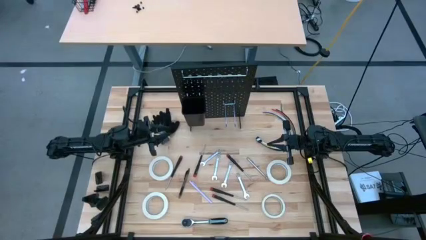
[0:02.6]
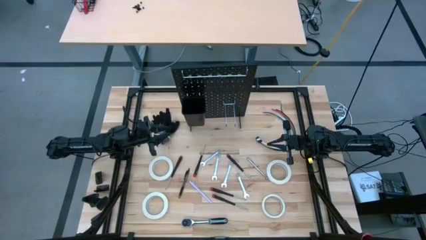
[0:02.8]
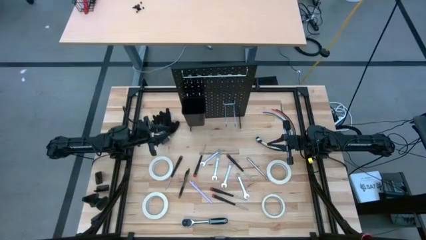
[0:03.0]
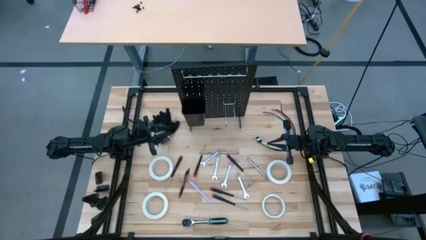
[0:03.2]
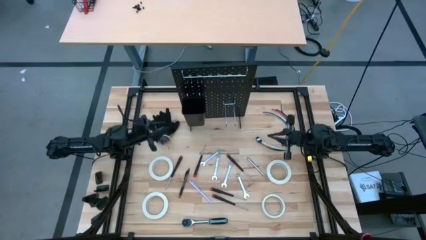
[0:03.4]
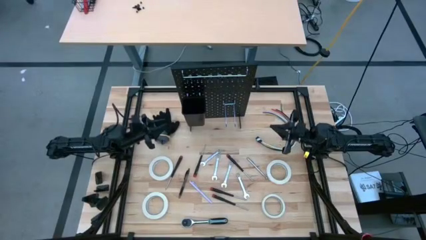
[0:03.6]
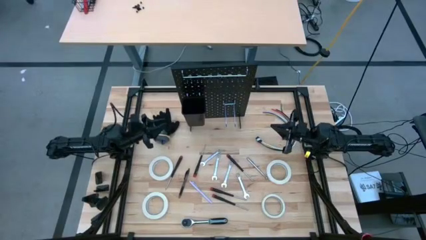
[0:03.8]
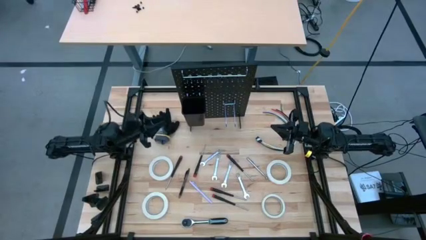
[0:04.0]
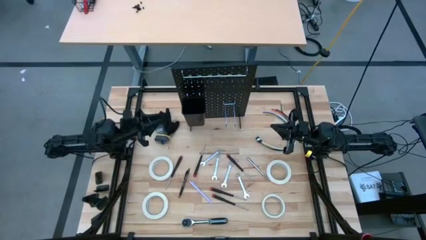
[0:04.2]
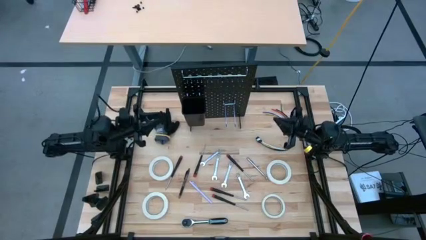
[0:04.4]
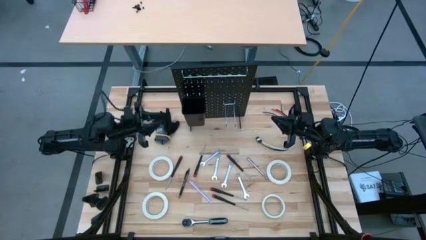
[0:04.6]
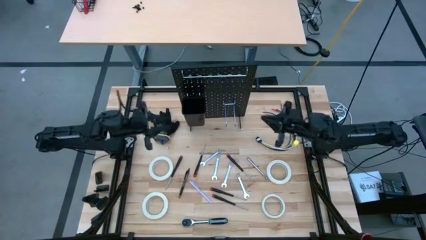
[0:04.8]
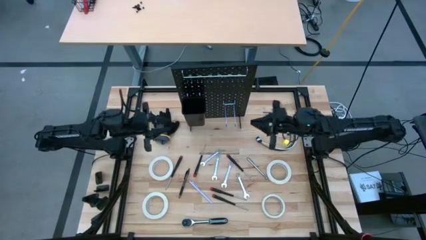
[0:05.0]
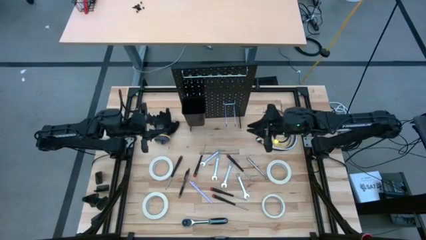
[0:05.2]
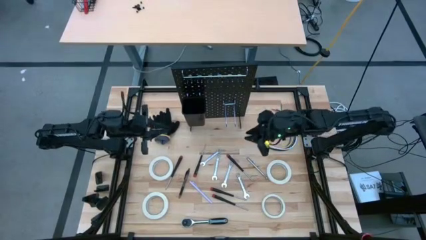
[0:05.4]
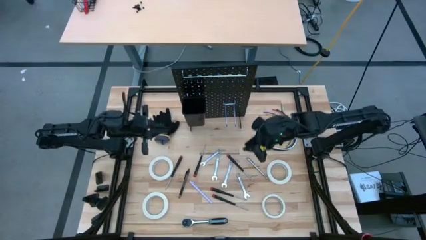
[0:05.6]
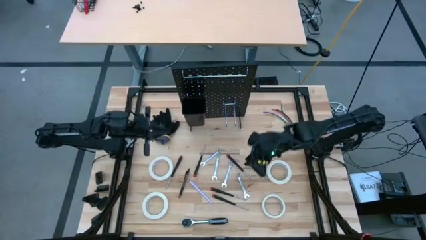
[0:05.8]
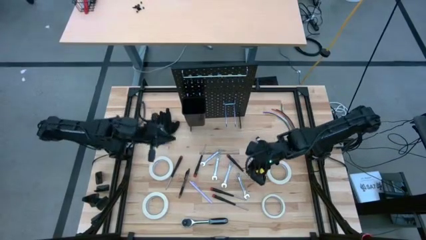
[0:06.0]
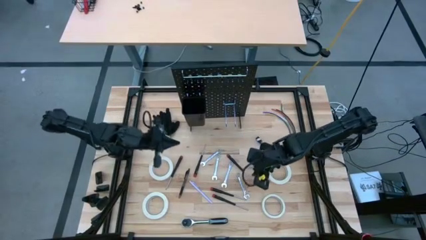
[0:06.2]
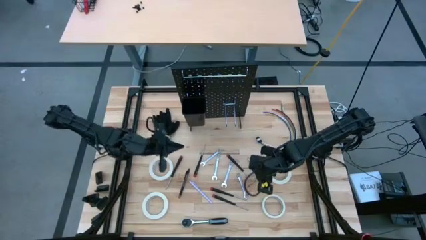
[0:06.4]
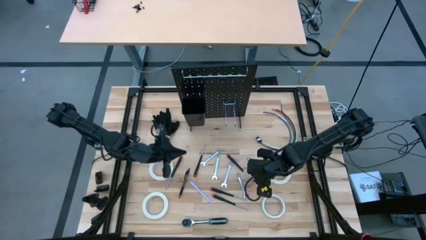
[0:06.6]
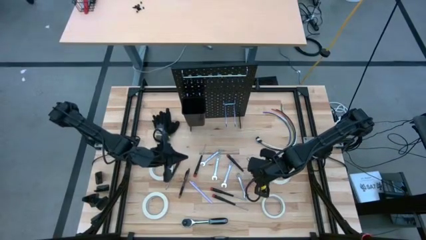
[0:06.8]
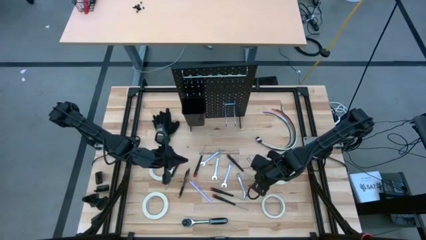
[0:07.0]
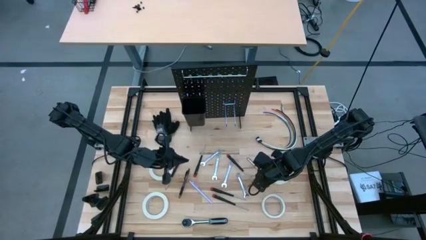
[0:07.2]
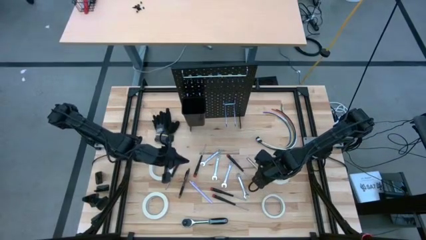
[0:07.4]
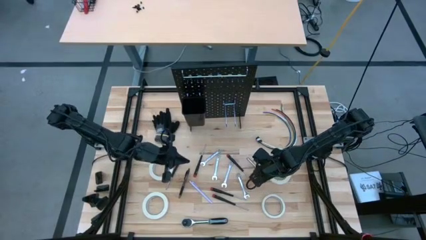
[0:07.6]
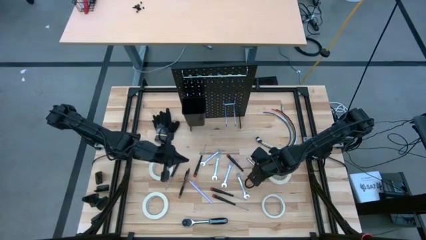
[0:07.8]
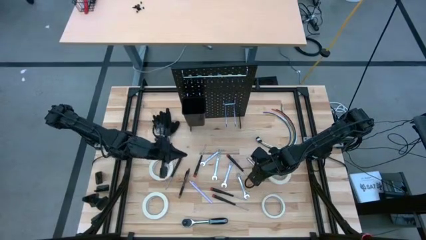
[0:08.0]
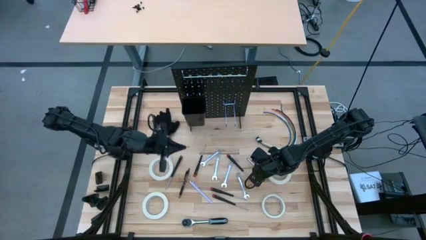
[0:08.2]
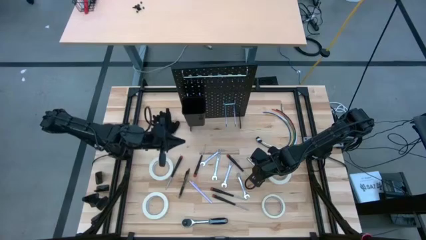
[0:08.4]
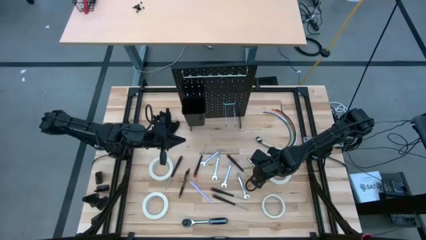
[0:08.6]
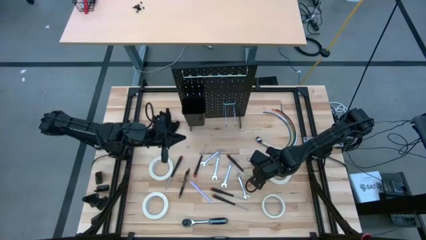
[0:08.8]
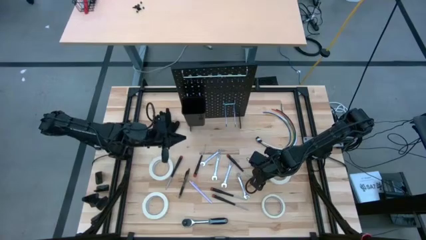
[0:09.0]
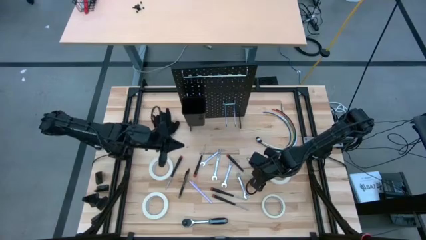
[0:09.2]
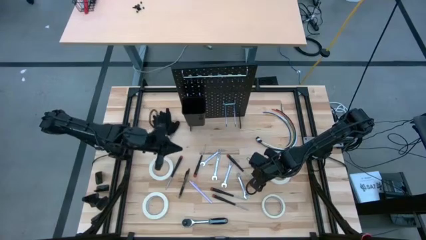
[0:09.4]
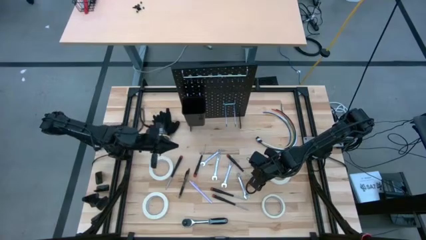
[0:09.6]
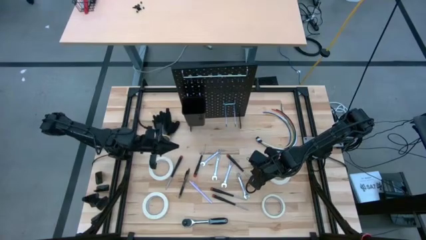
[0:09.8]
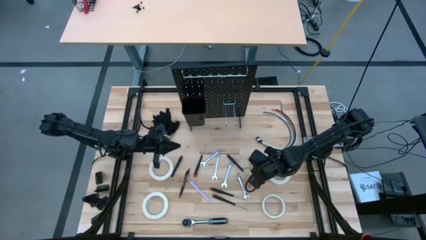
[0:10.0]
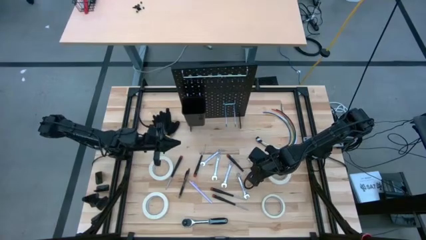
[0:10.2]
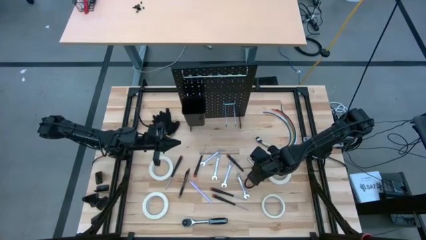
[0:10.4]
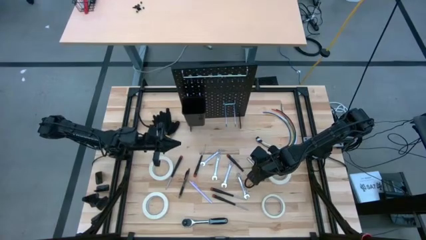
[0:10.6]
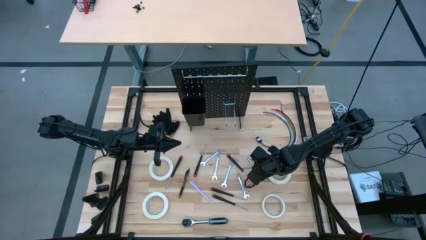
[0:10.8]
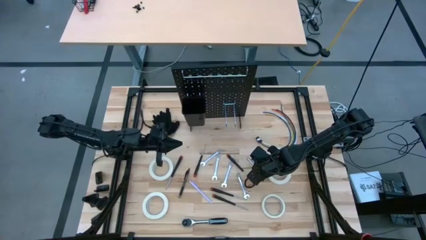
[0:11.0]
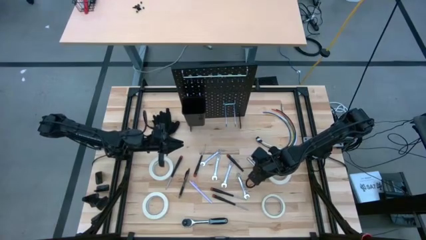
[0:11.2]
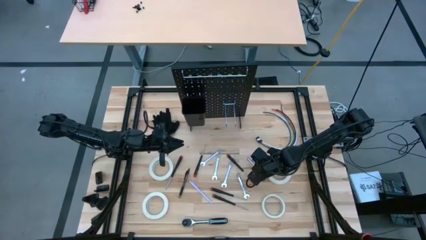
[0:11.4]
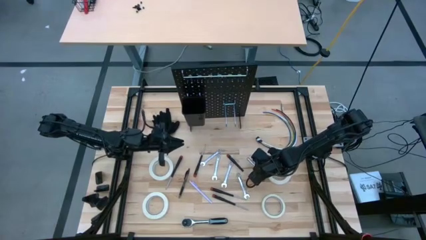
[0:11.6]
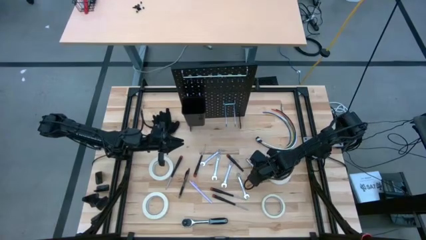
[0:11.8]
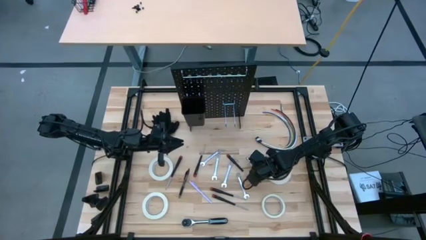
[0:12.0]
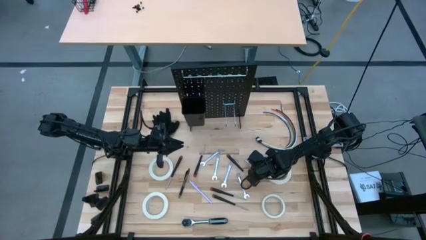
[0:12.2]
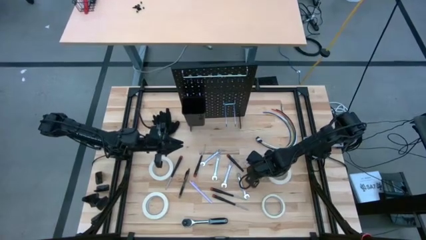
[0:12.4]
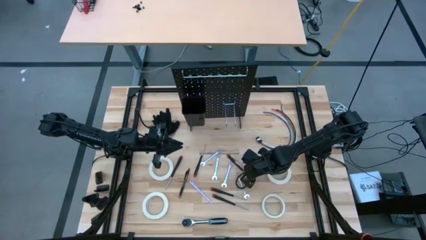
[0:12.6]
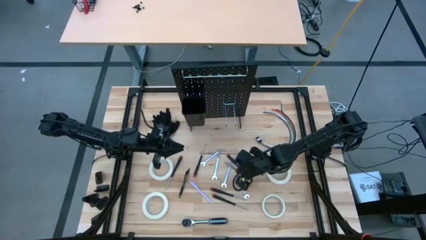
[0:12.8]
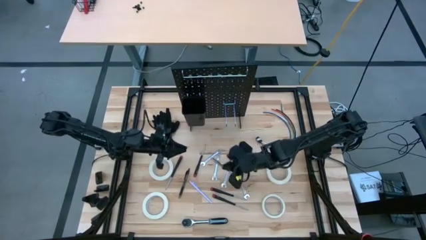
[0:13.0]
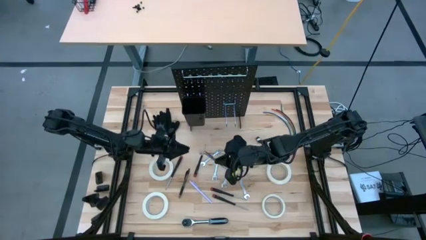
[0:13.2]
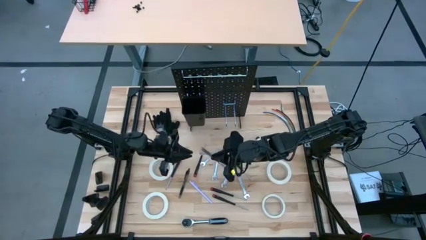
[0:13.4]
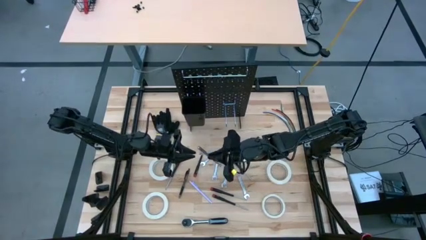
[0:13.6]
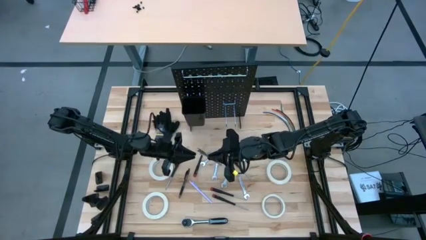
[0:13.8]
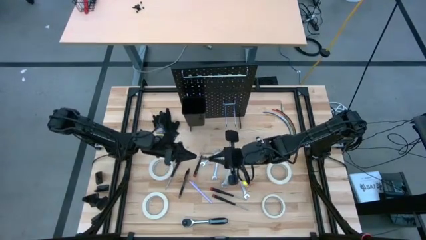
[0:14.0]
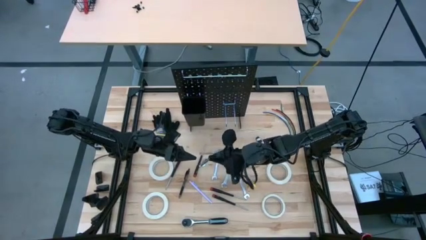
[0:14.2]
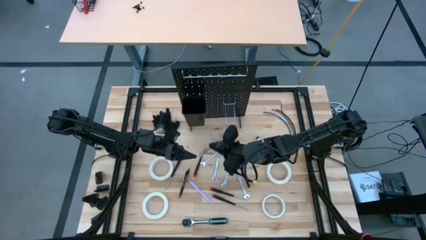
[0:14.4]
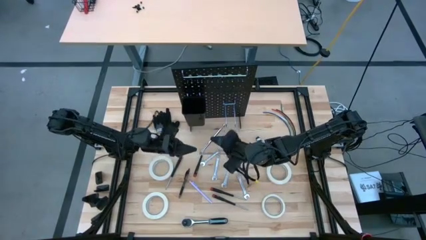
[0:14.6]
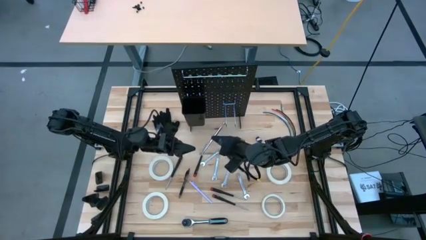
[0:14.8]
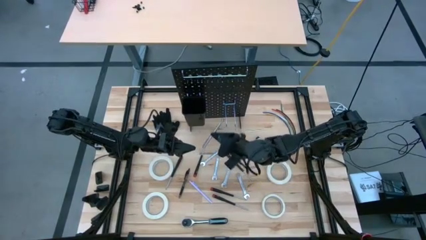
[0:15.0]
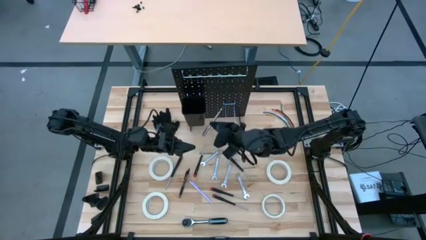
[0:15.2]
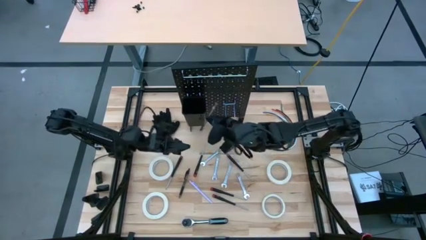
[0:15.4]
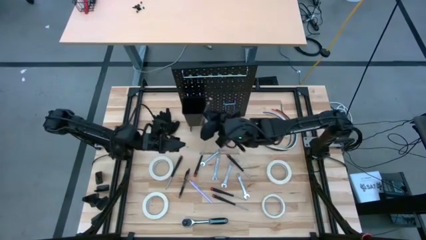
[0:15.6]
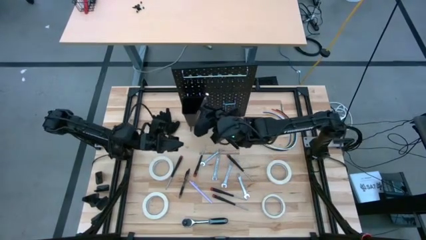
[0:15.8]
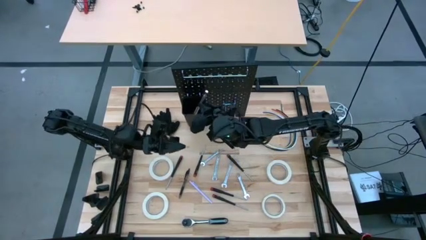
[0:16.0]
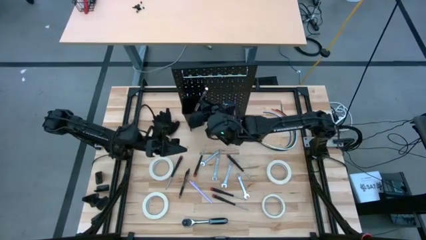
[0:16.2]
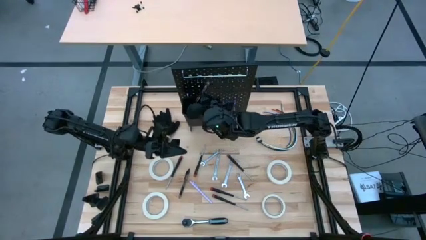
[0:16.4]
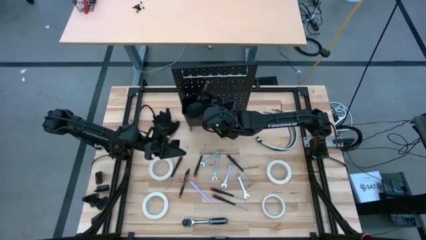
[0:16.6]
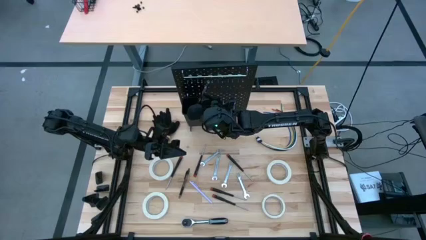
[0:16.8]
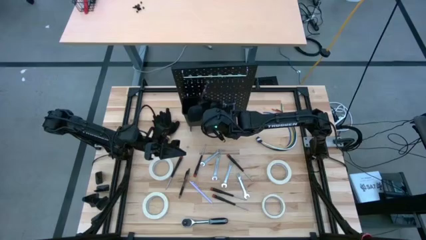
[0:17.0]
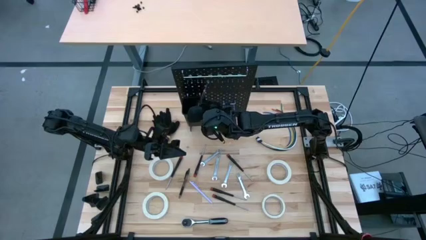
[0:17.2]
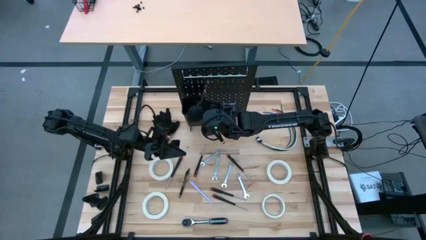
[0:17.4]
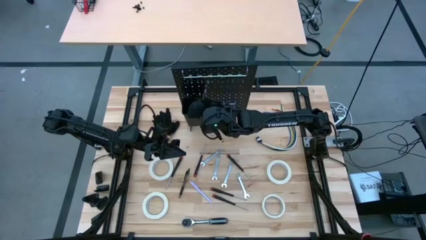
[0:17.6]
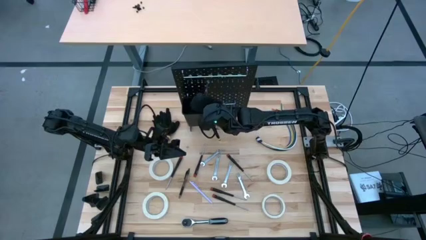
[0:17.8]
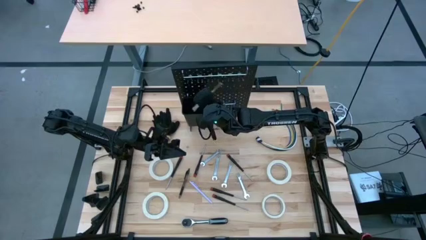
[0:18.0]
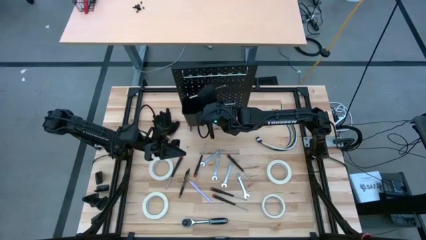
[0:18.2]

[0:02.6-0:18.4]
Task: Hang tools onto peg board
Put the silver magnetic rod into the black bin on the peg board
